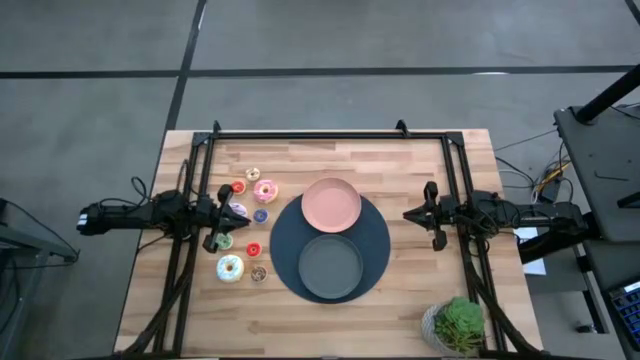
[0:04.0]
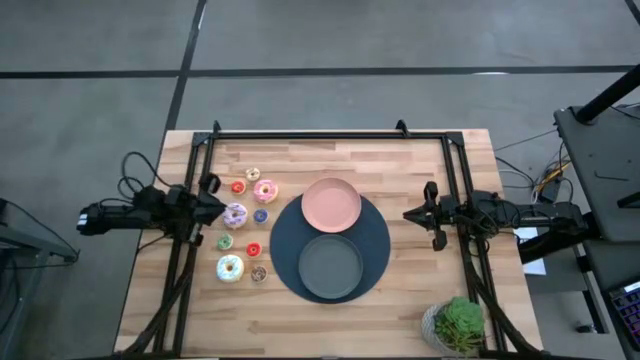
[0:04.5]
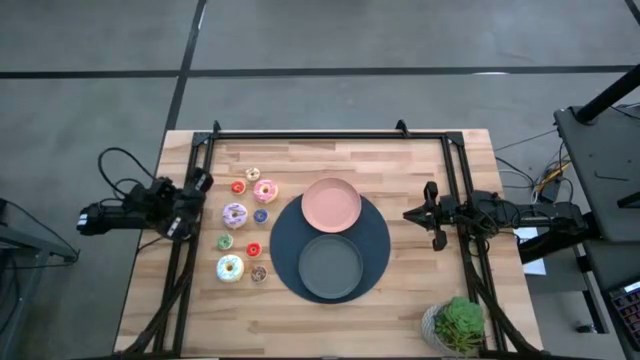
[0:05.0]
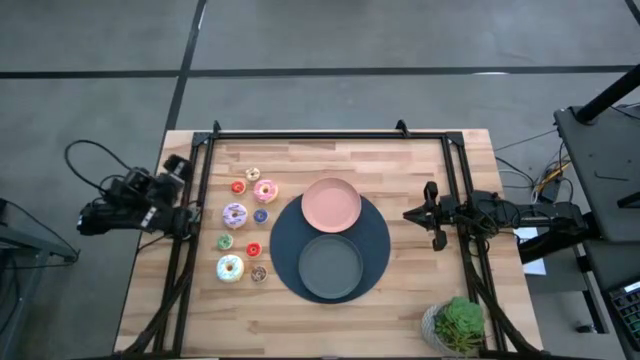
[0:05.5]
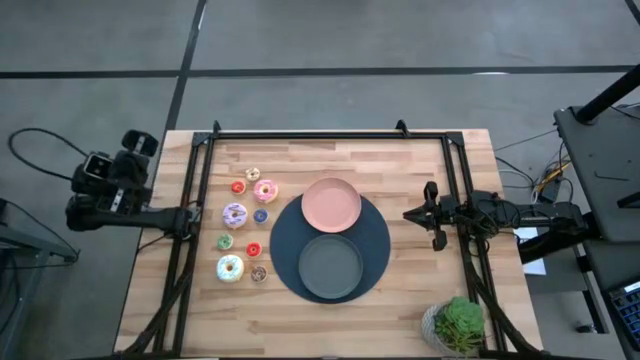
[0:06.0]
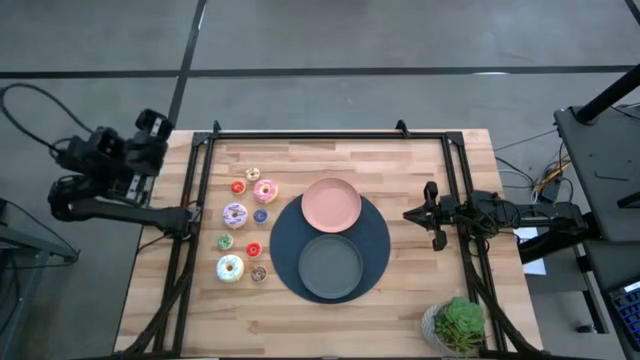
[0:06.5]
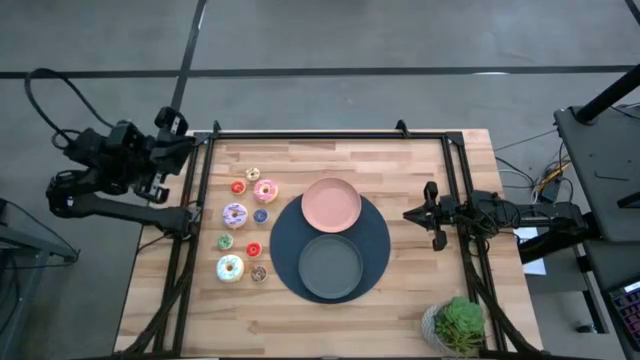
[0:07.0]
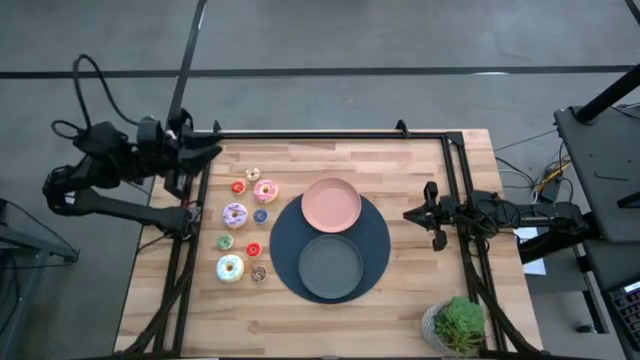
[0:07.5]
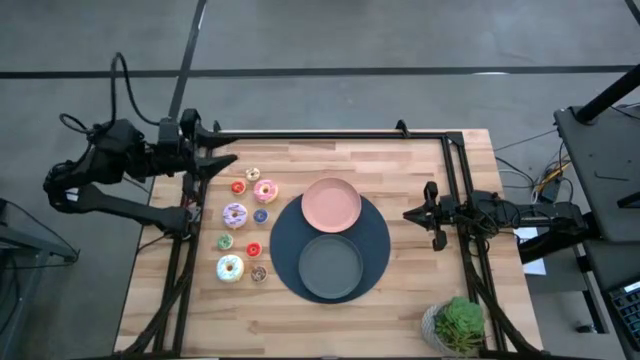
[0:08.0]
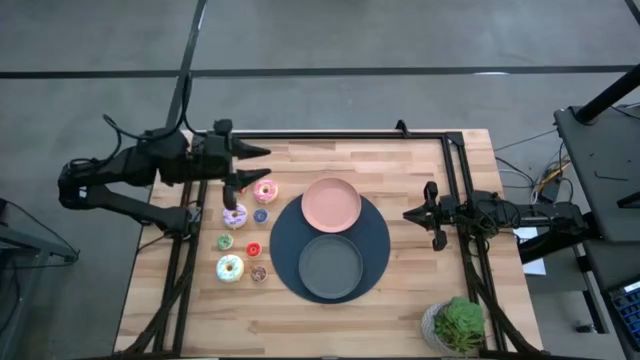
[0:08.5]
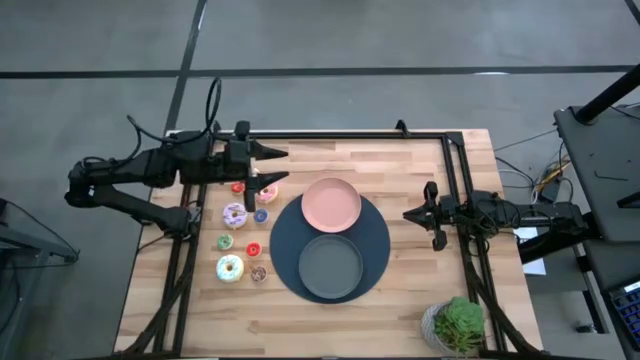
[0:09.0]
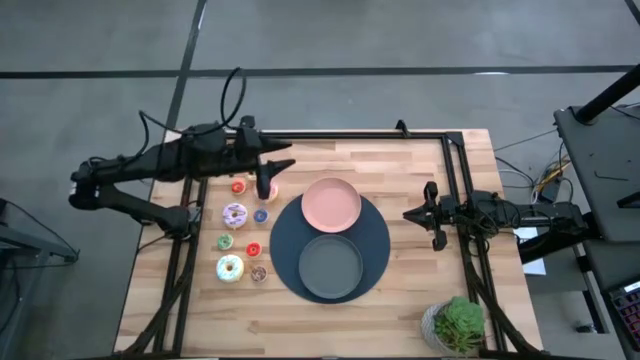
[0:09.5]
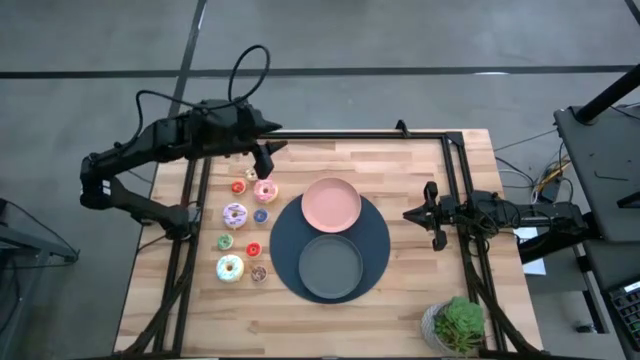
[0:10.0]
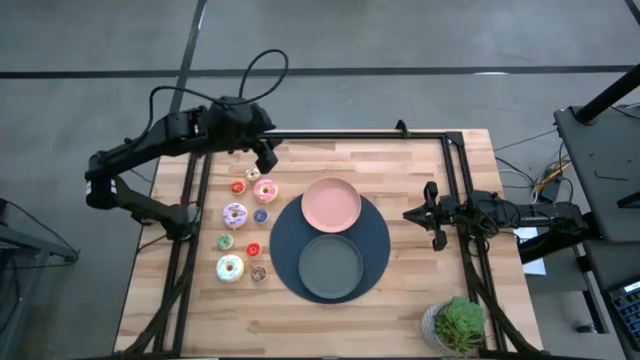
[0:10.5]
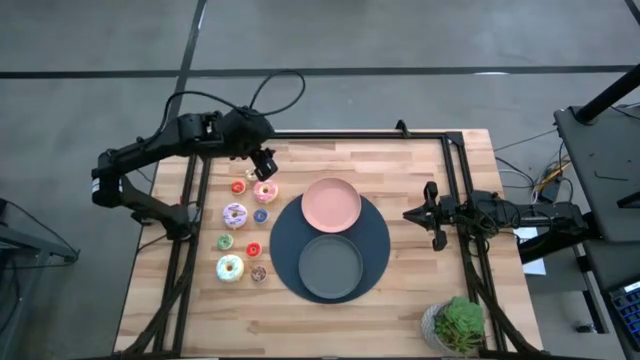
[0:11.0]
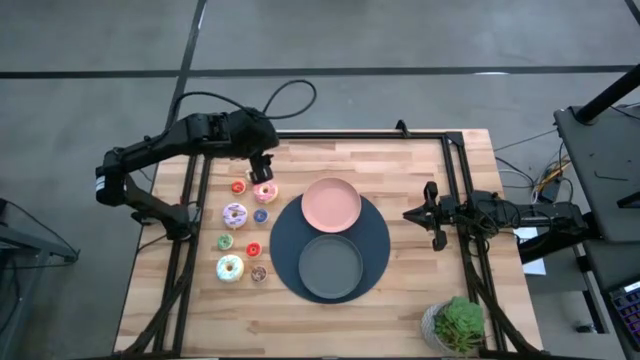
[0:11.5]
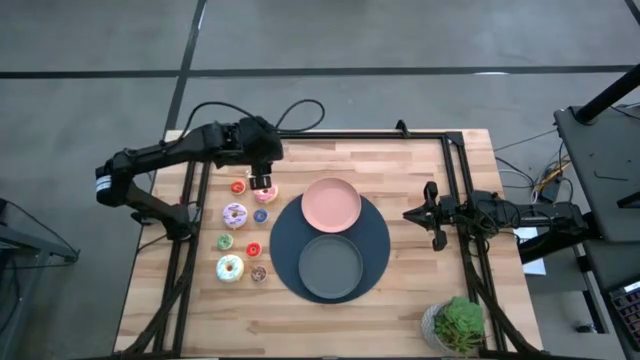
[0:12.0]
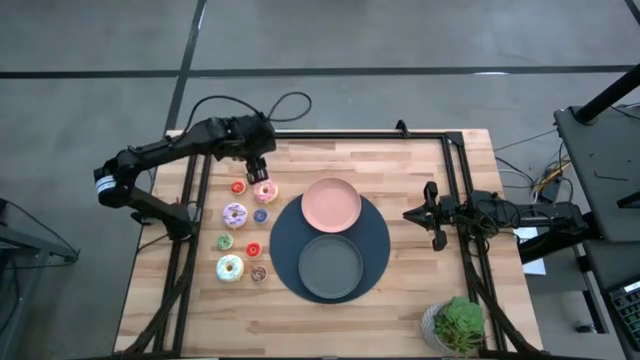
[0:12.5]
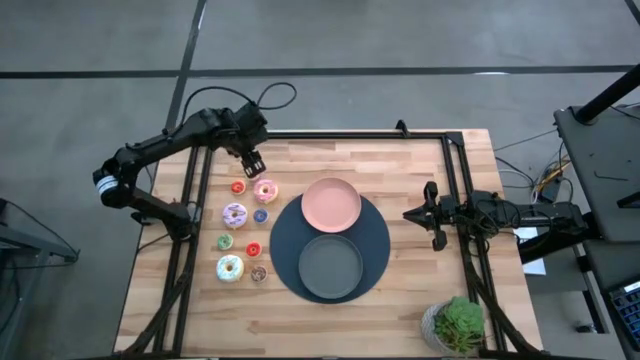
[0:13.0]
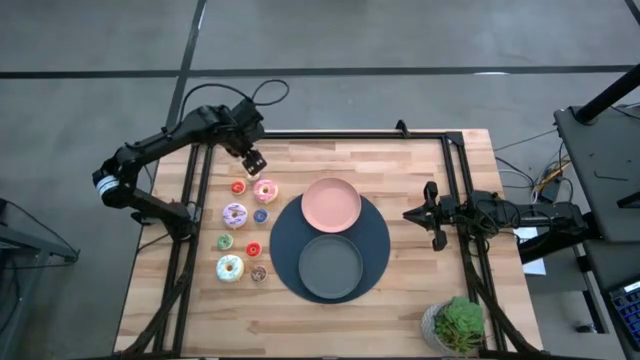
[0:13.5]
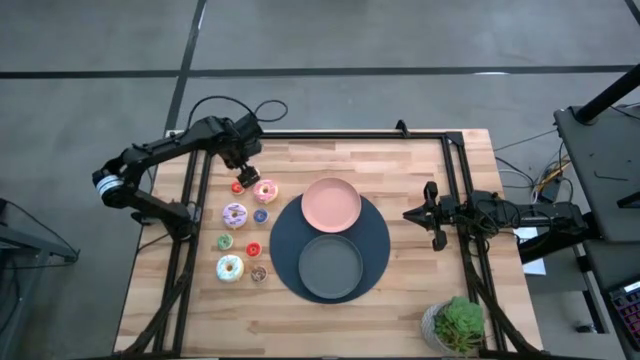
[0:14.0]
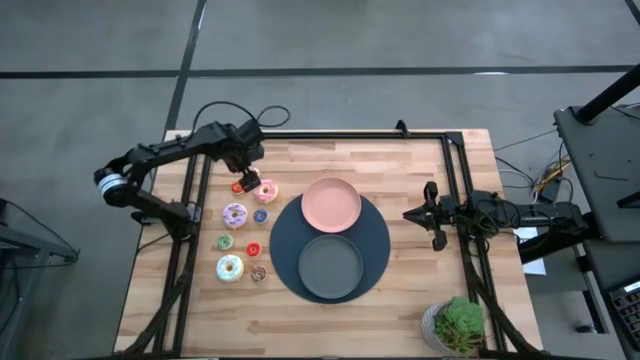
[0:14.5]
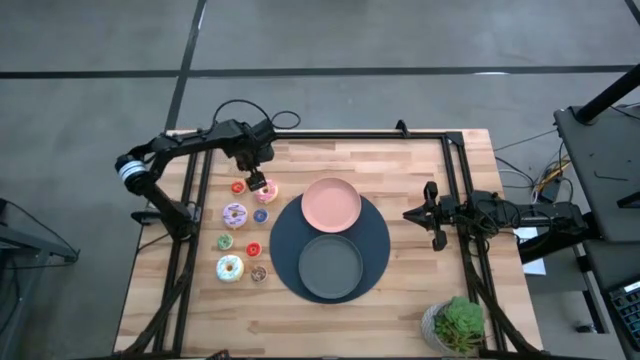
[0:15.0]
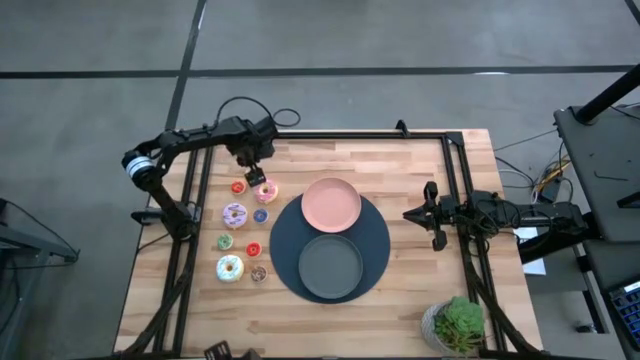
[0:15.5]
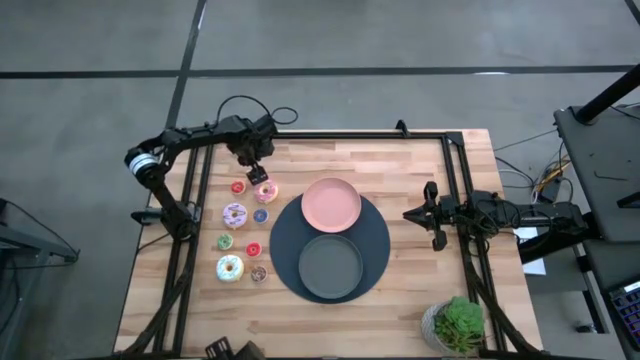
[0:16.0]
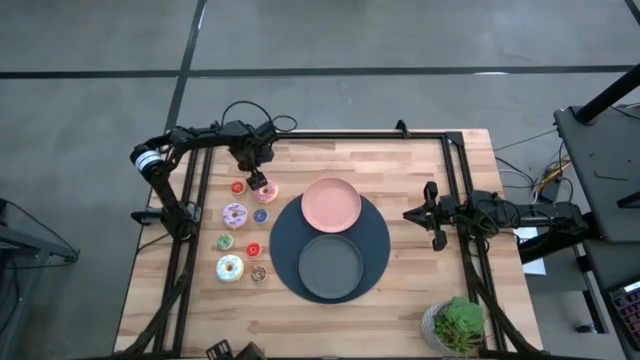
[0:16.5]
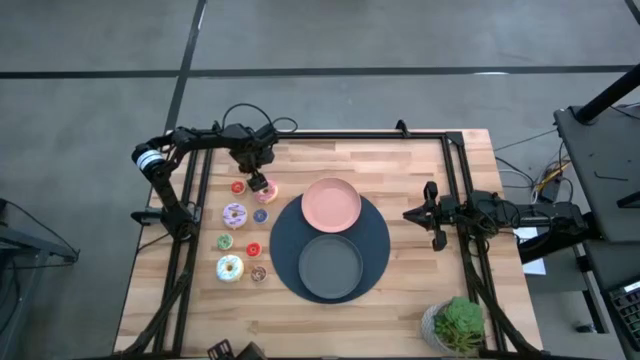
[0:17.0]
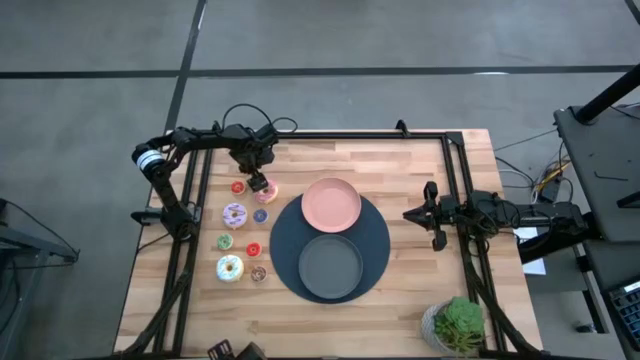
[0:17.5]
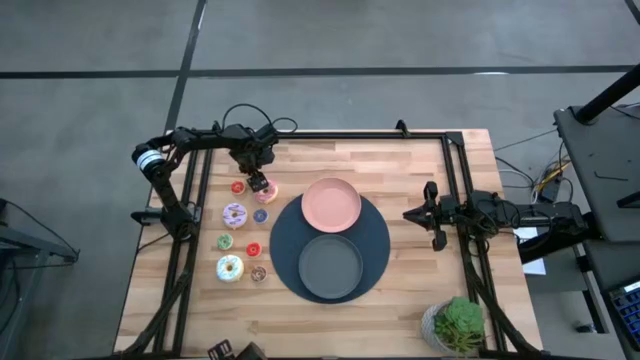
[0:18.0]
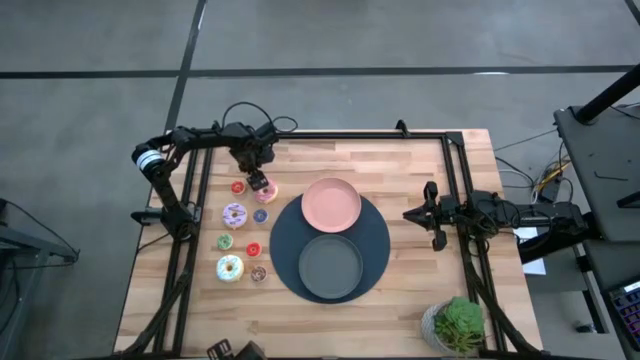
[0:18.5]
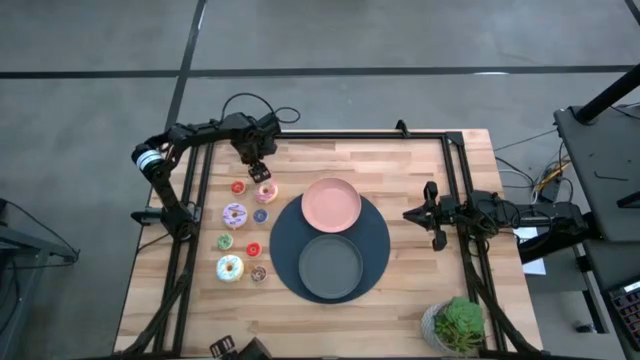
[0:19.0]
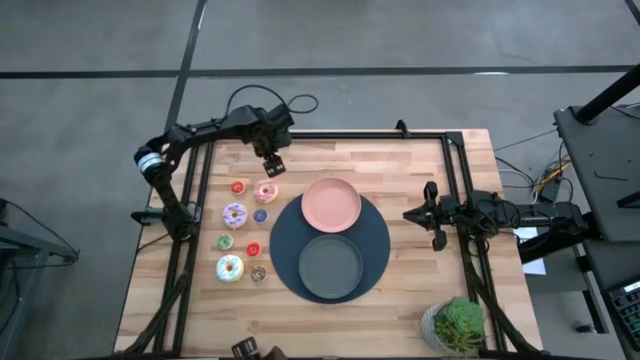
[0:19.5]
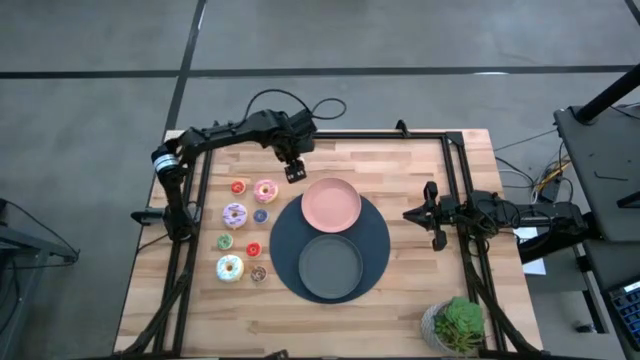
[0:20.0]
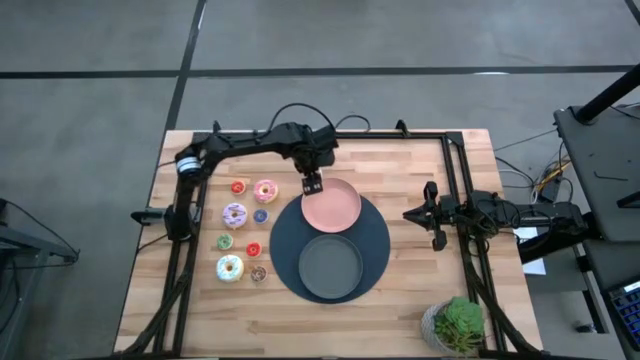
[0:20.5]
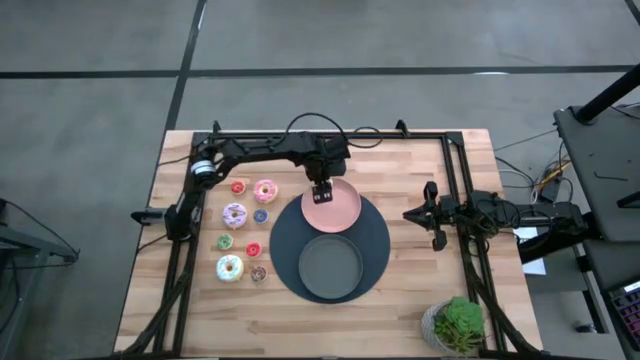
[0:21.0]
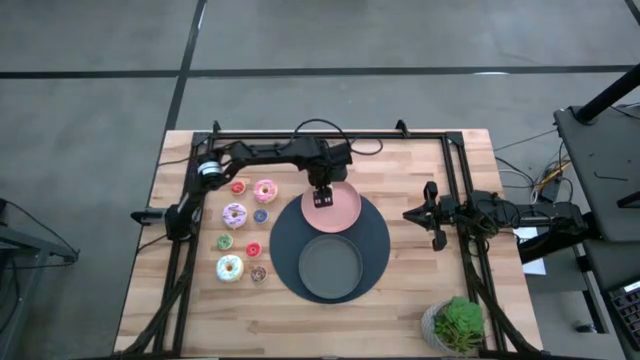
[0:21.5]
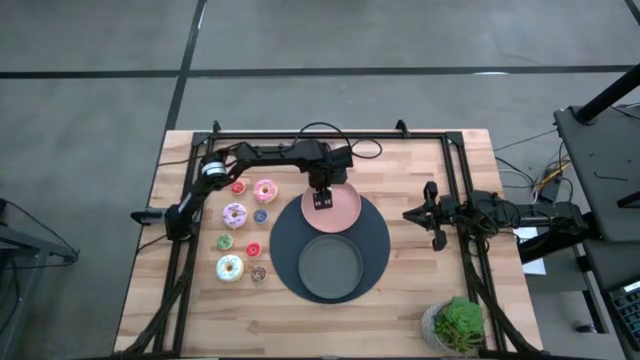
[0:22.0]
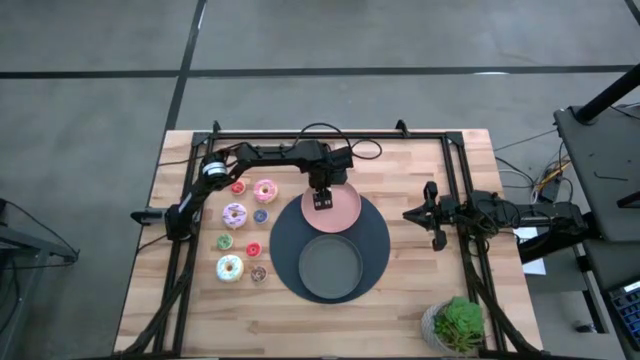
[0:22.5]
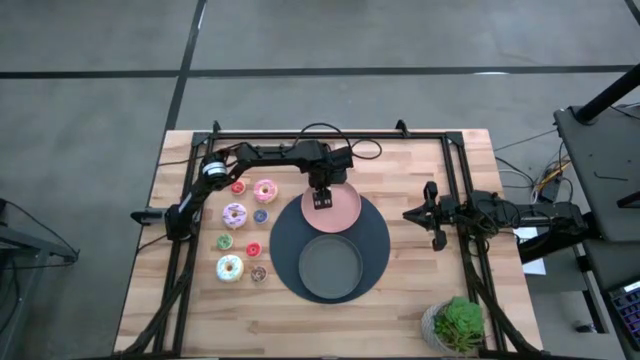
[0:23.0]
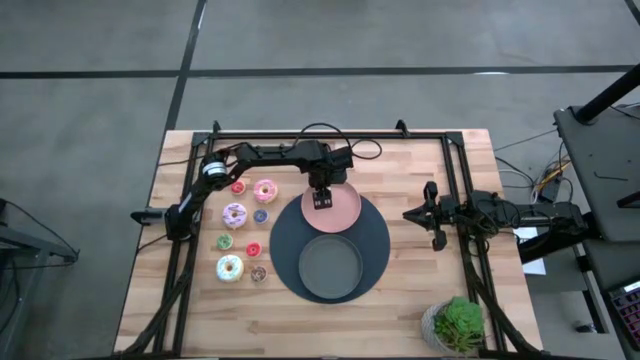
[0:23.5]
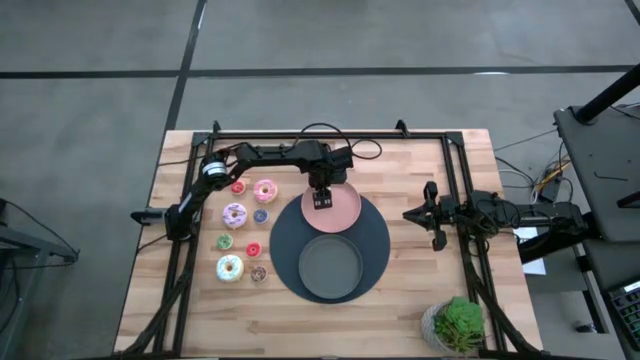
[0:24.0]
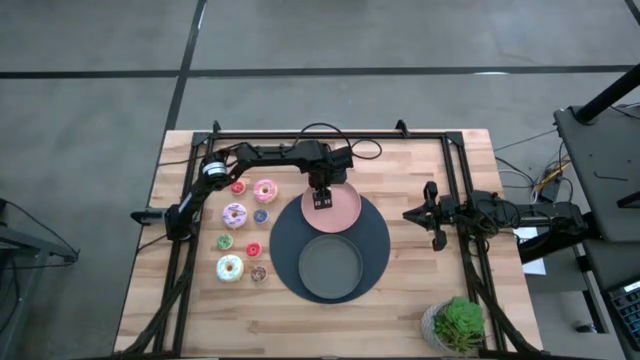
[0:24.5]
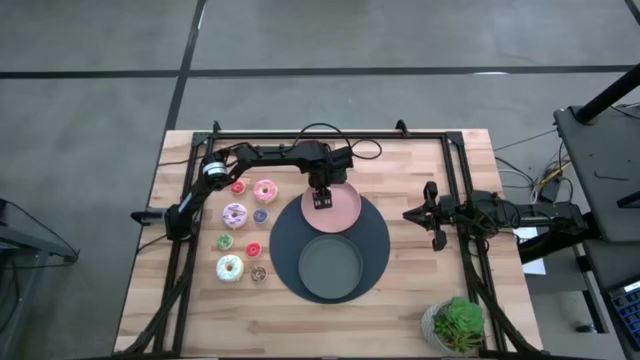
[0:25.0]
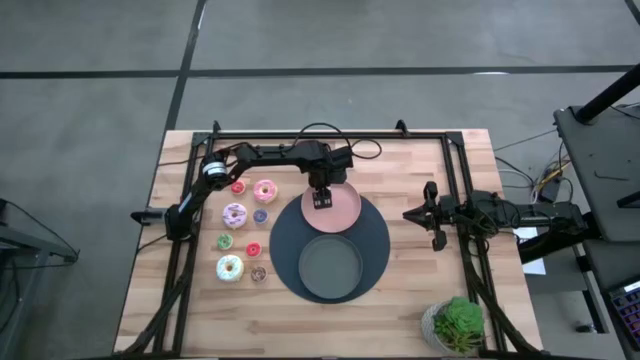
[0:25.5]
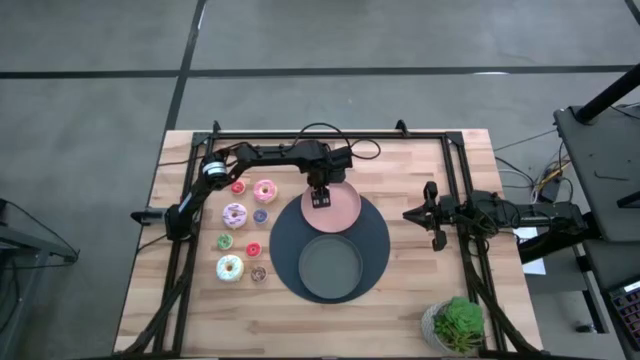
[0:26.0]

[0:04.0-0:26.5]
Task: Pick & Place donuts
Put the small white donut on the pink plate
